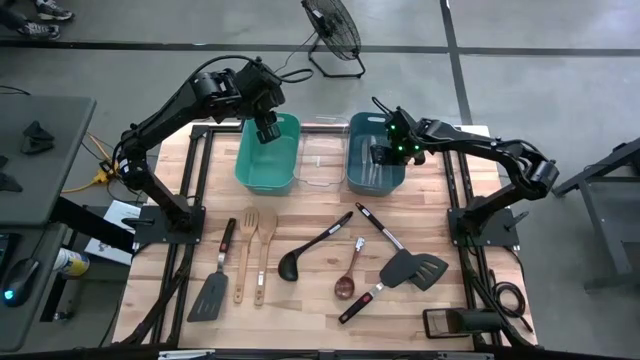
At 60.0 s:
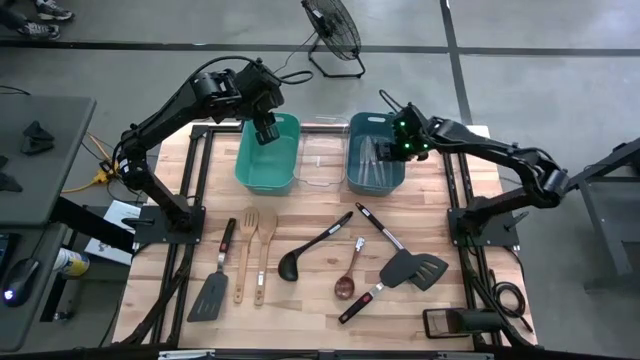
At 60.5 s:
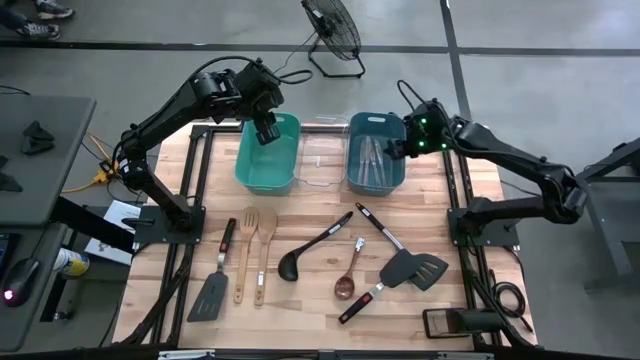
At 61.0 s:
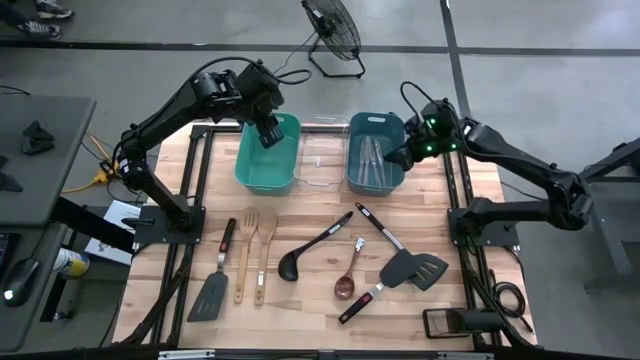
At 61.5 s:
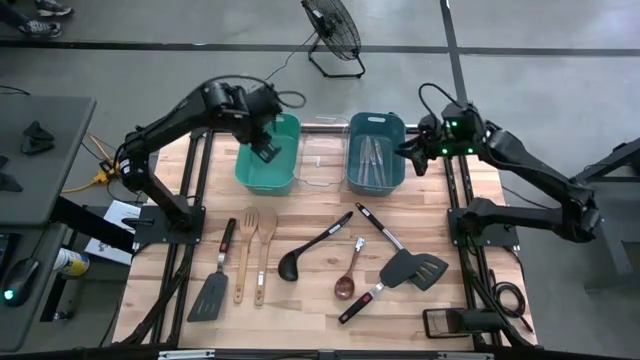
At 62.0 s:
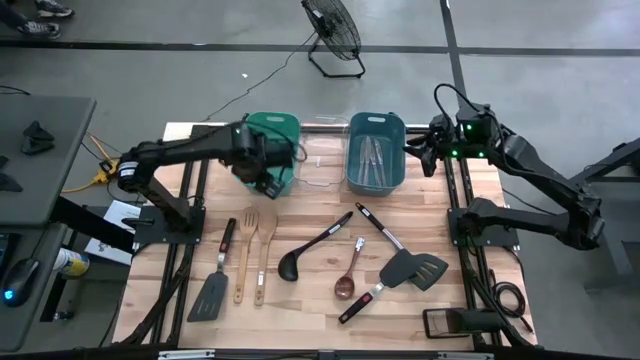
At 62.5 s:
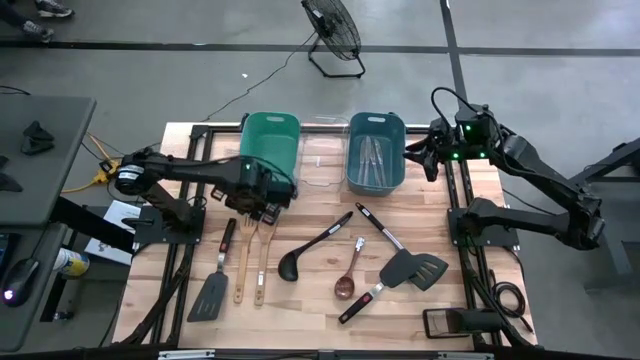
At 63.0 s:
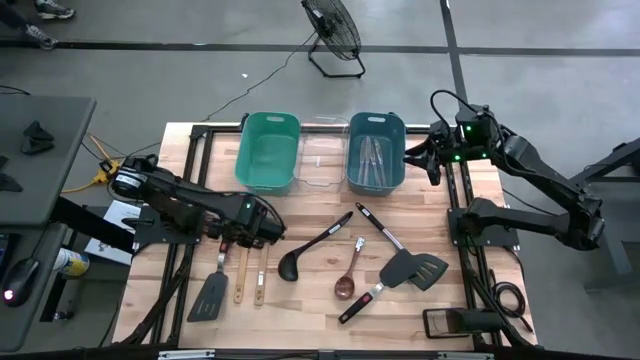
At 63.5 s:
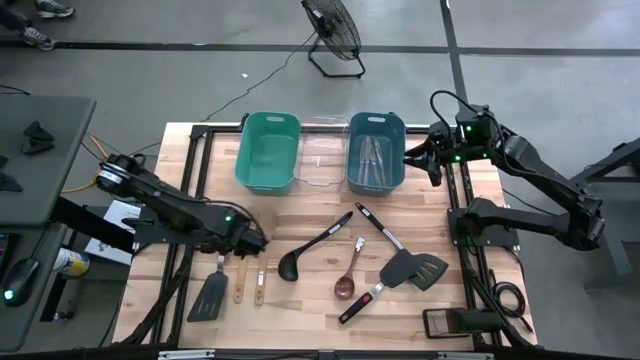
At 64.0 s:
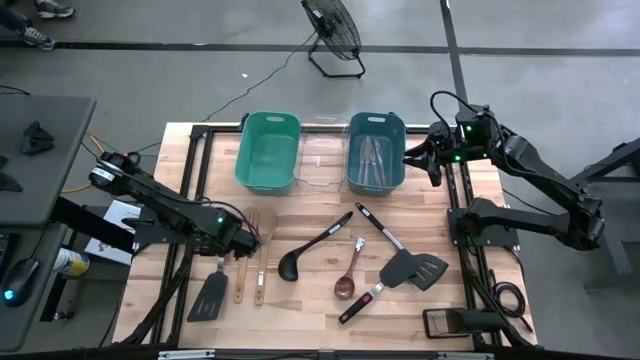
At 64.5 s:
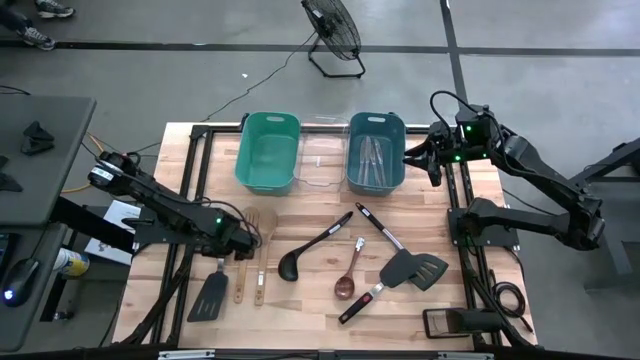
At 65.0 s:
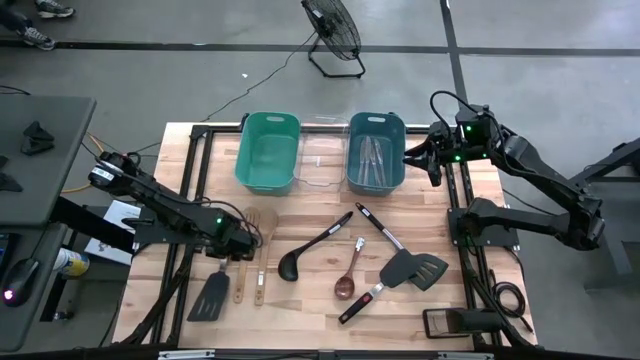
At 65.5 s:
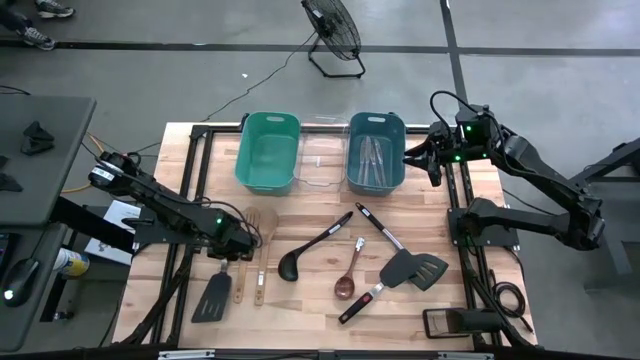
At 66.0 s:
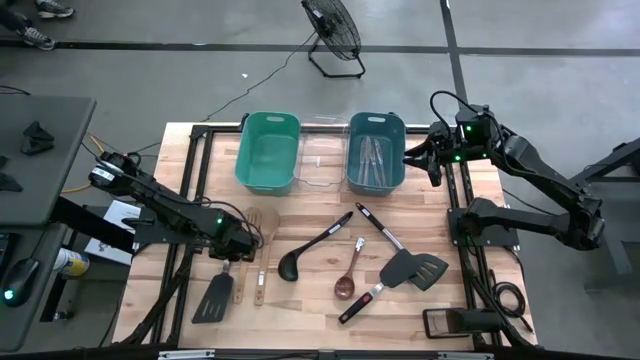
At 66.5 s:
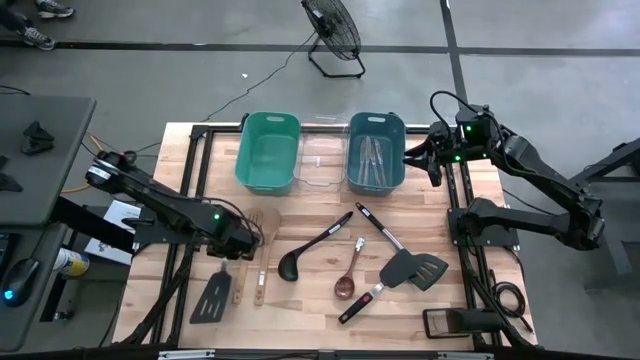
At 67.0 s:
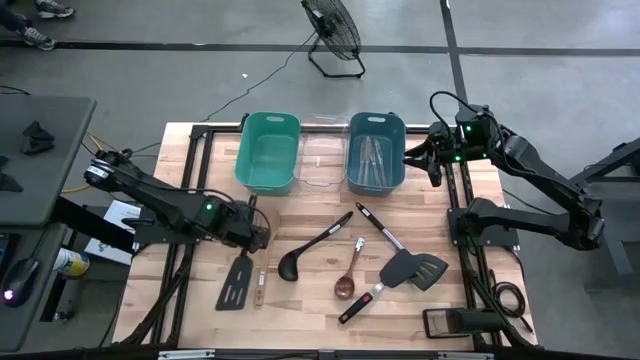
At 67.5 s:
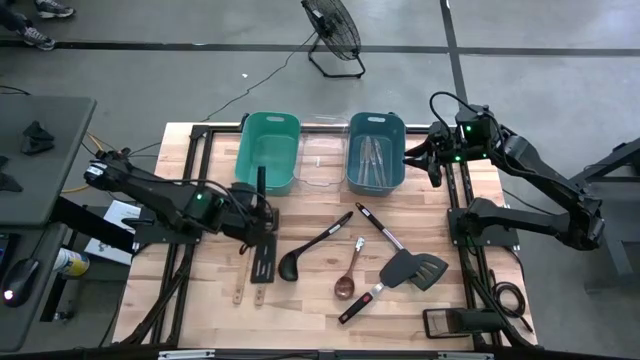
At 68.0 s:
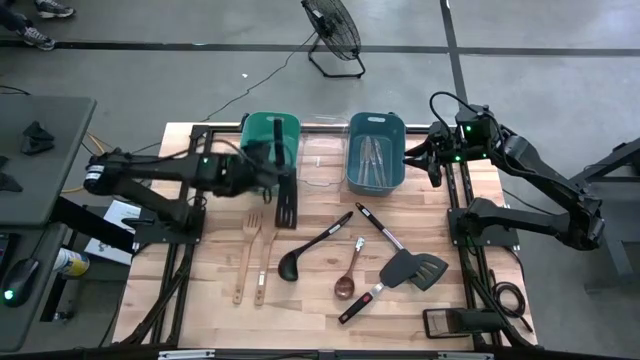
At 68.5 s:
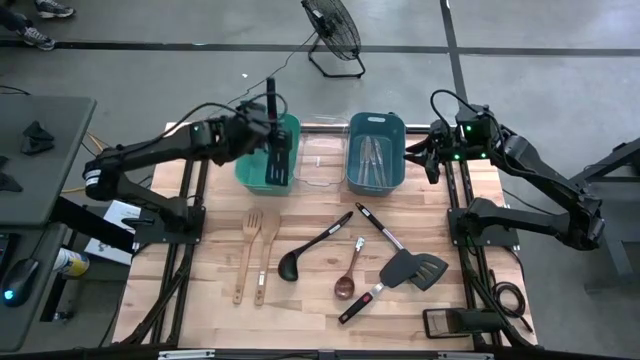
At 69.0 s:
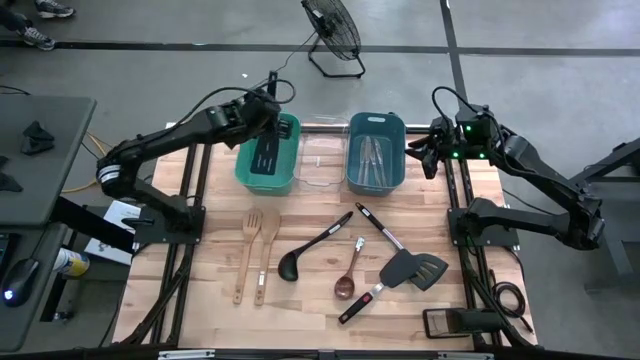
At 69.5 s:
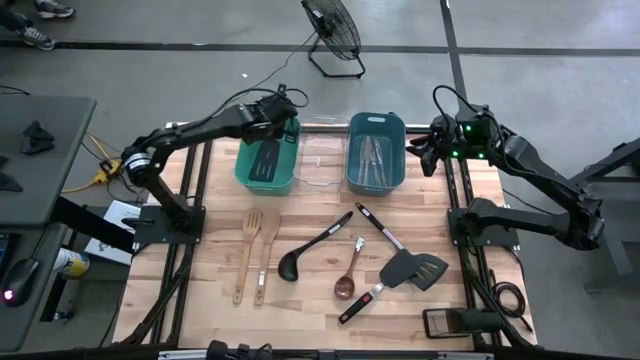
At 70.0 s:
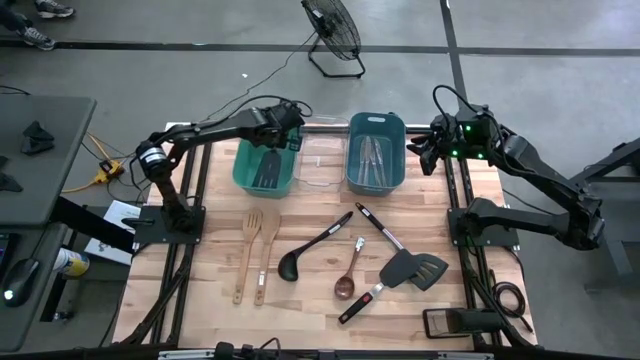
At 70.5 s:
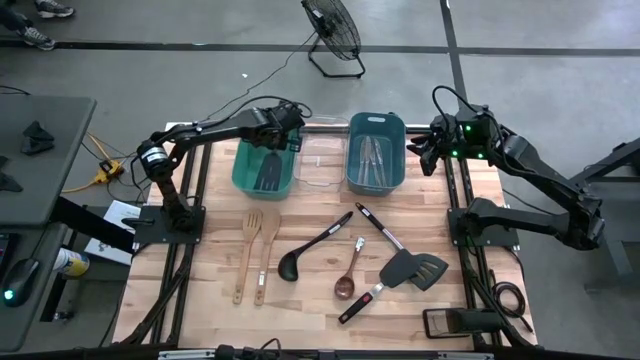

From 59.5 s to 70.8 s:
Task: Pick & Place Kitchen Items
Put the black slotted spatula into the green bin
